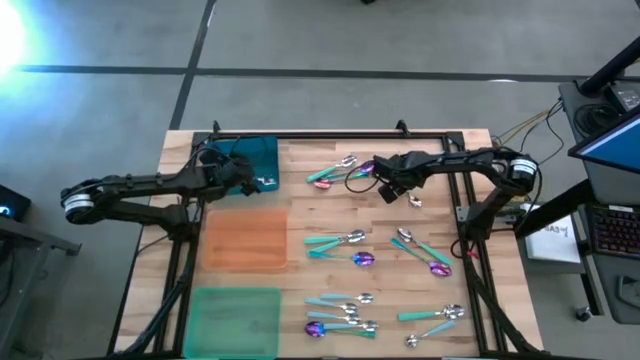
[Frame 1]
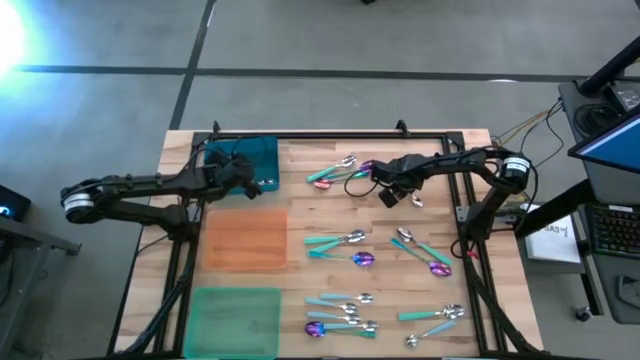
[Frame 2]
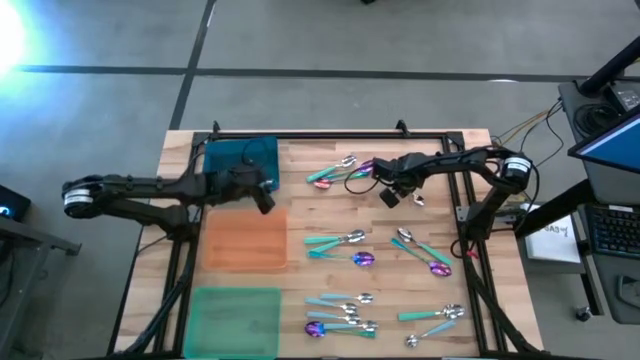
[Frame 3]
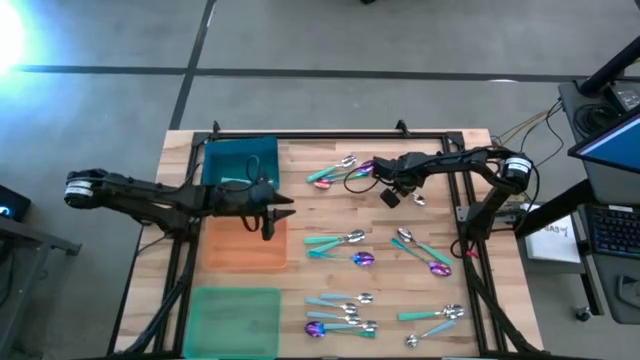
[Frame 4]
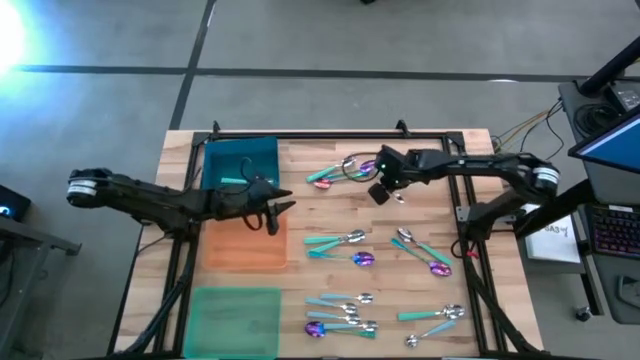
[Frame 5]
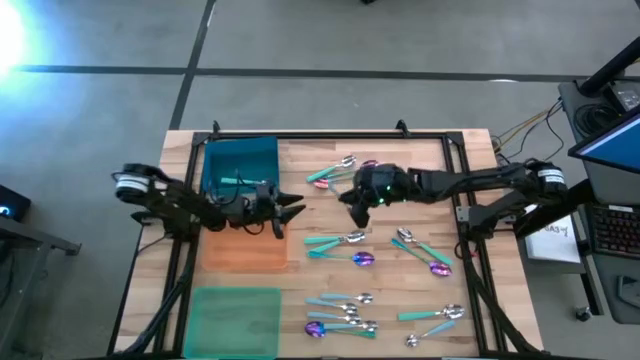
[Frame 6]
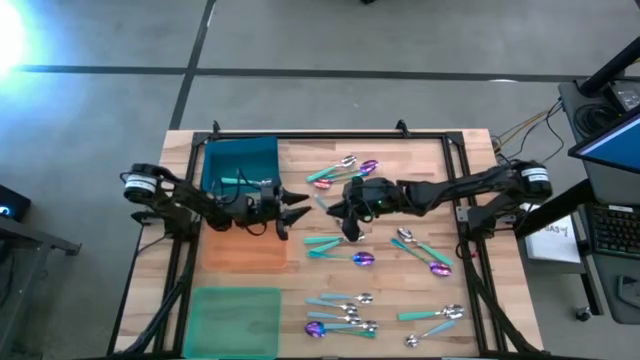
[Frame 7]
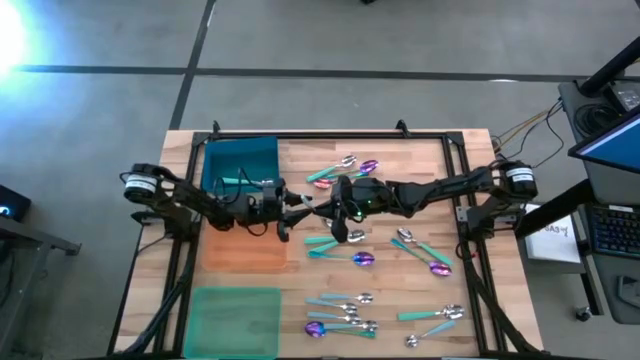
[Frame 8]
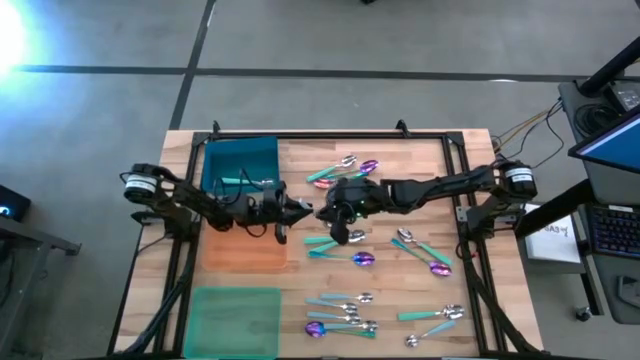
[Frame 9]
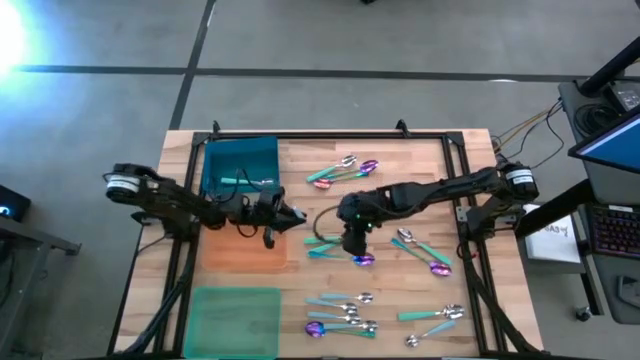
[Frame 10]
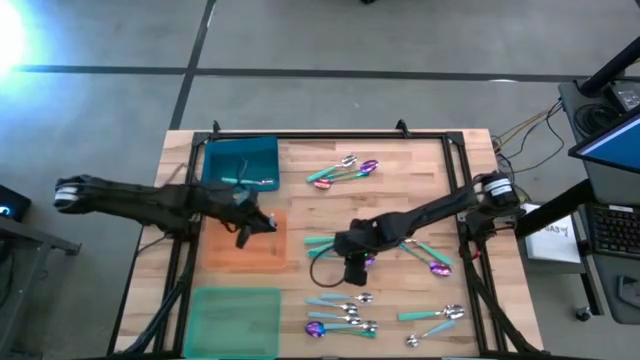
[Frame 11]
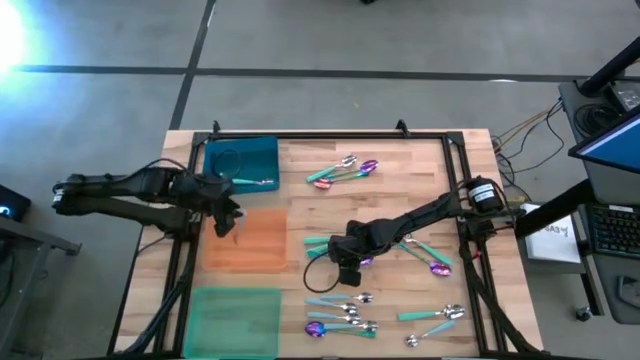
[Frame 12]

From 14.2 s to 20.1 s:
Task: Sort silverware by color (type)
Put the blue spoon into the orange bin

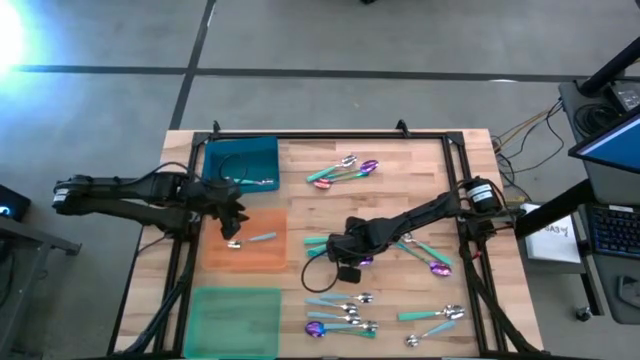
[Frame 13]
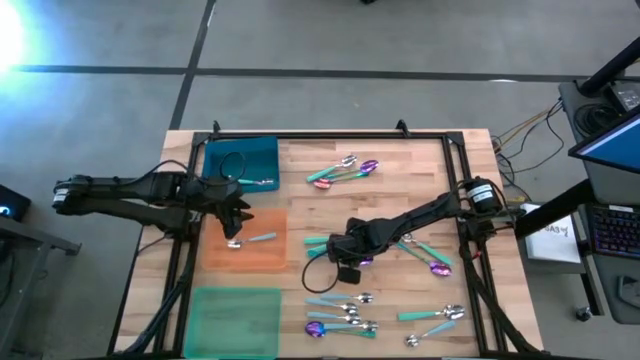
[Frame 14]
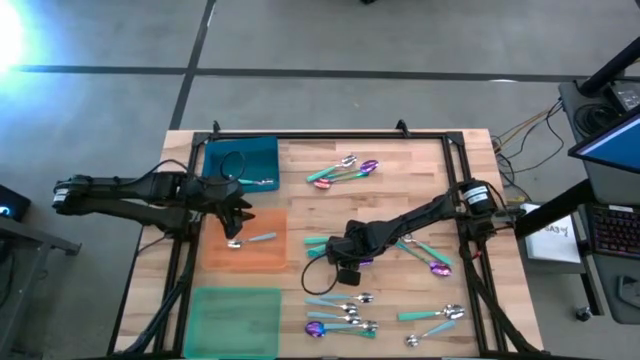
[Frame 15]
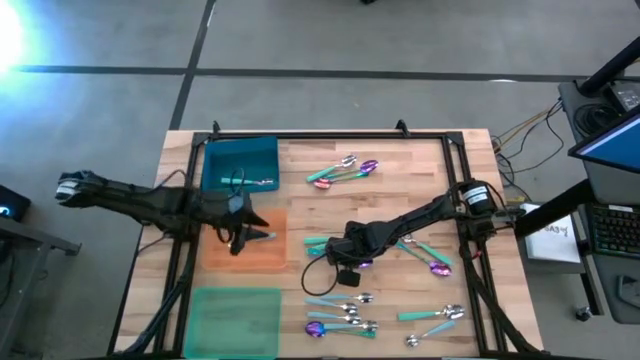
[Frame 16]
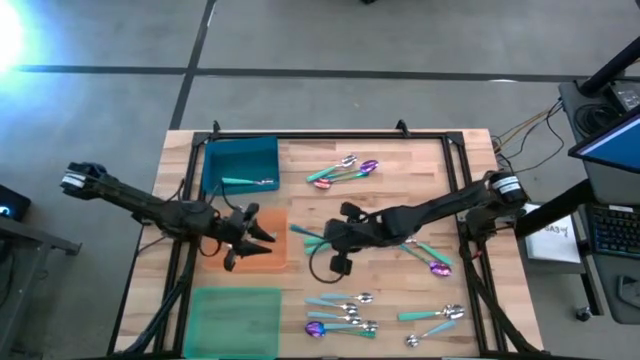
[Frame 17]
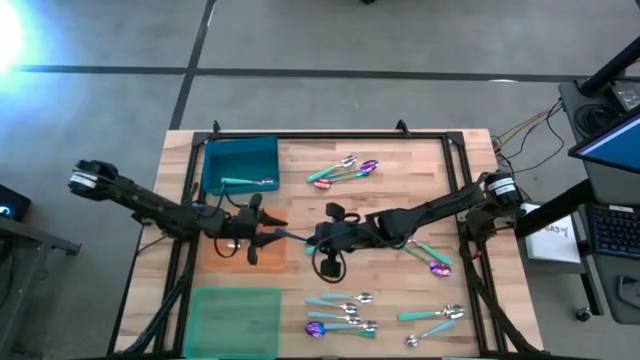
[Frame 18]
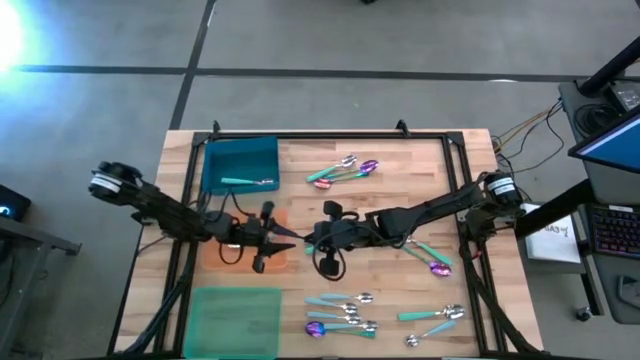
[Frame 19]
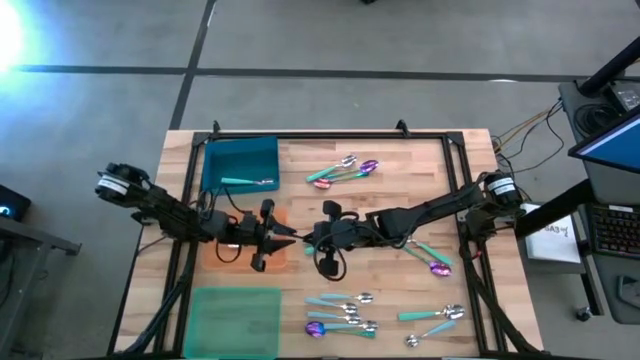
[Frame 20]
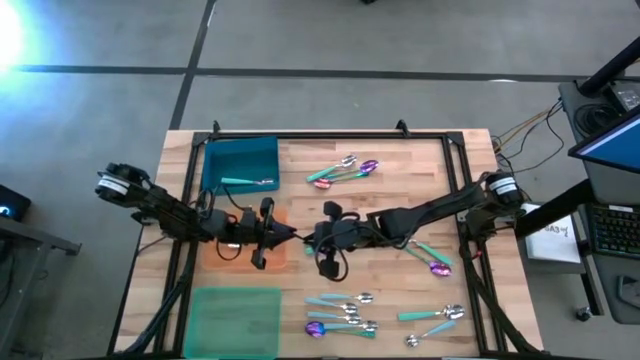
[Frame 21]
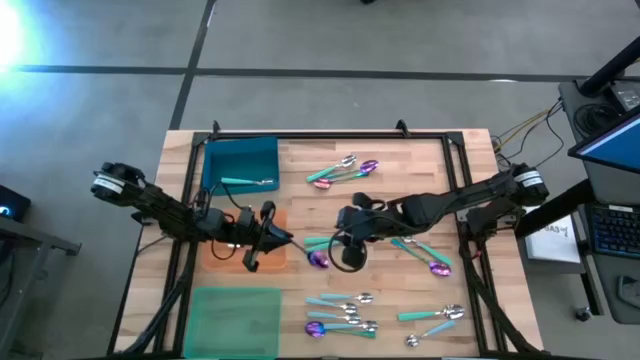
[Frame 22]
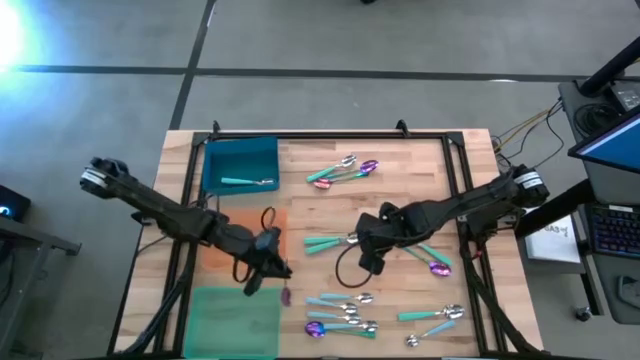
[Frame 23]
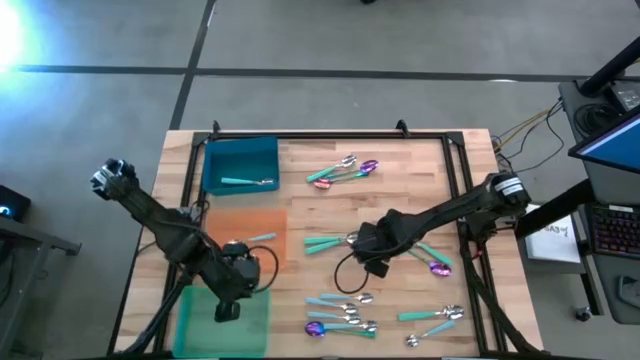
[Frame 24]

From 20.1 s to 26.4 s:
Put the violet spoon into the green bin

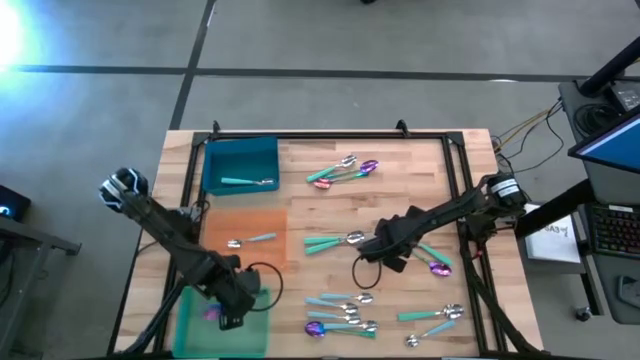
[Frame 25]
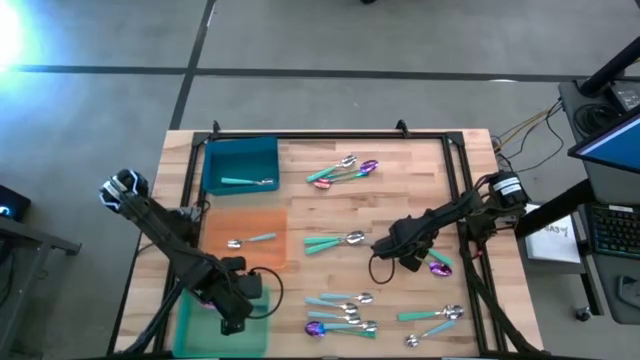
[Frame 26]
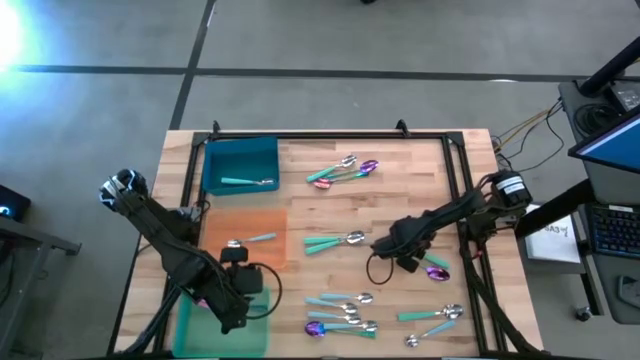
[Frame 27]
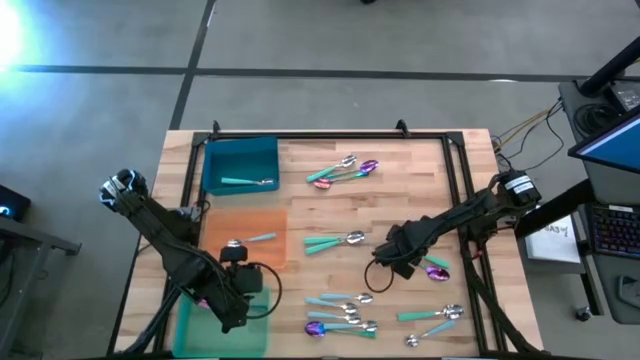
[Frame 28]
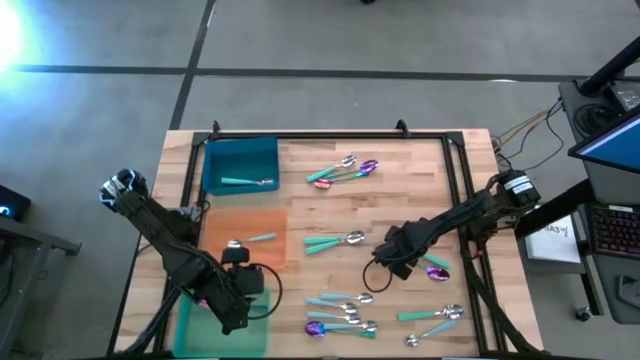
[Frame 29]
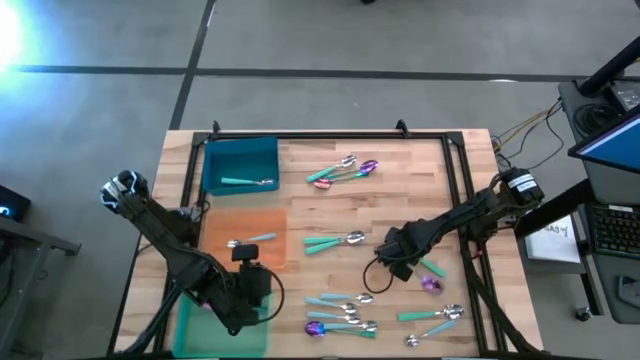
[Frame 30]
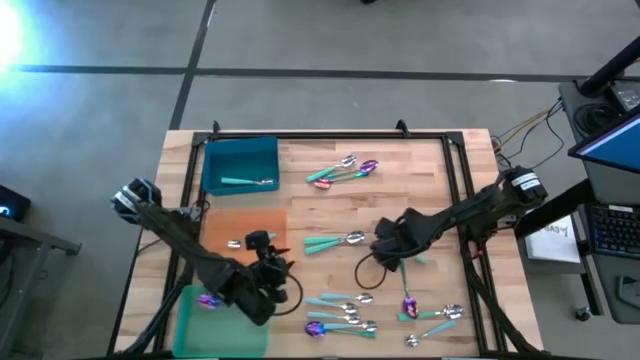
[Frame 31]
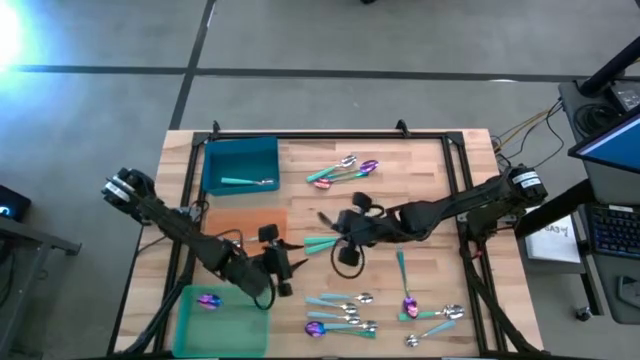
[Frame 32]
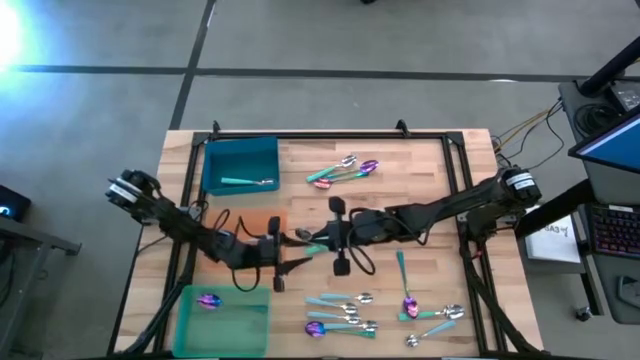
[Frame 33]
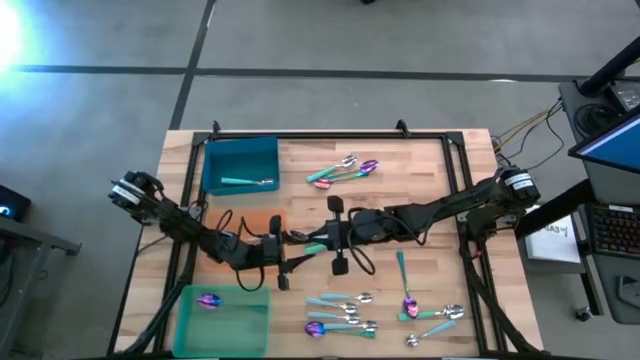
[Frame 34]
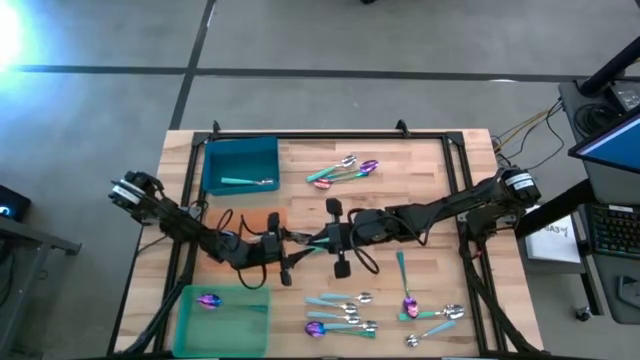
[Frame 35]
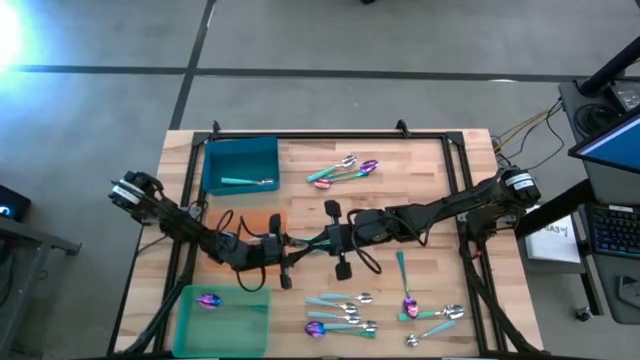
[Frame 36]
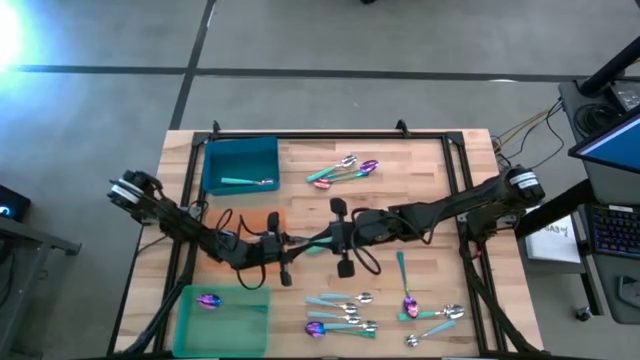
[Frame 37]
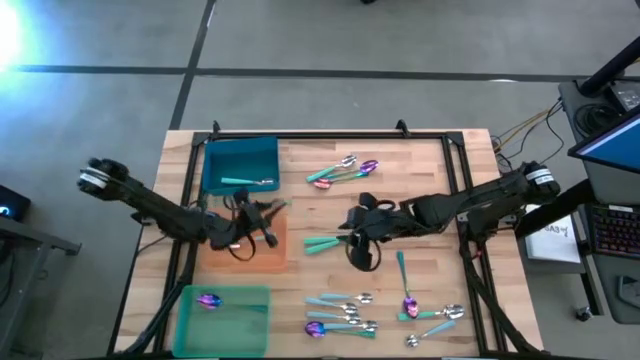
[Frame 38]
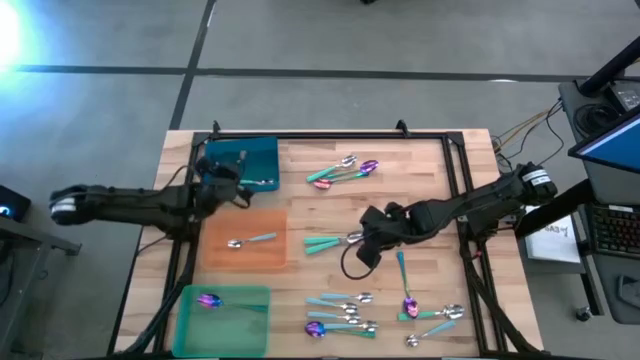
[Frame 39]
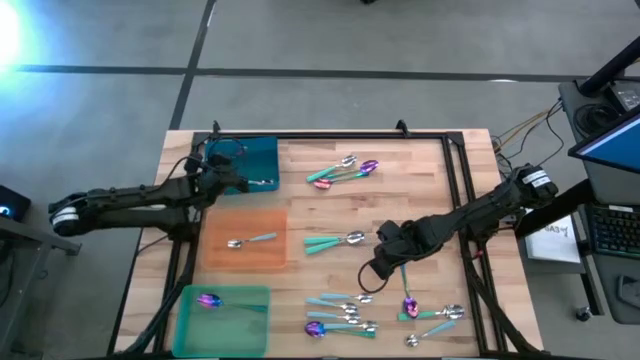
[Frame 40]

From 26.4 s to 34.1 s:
Put the green spoon into the blue bin
